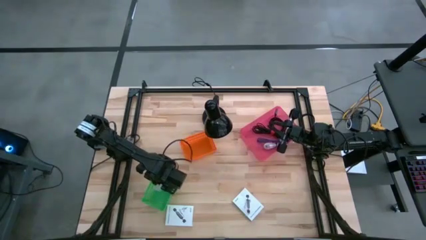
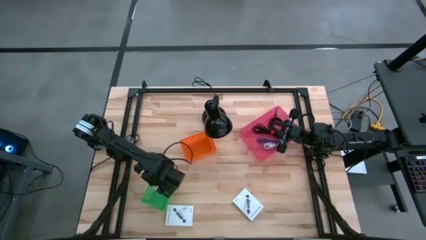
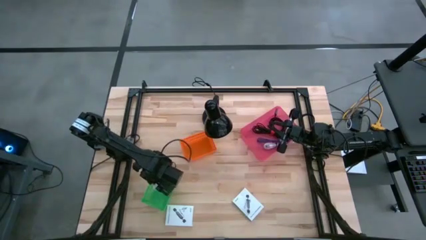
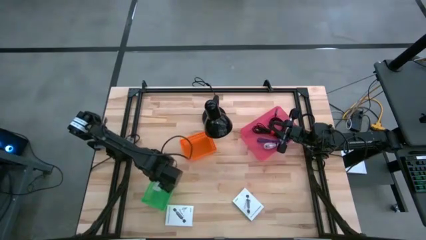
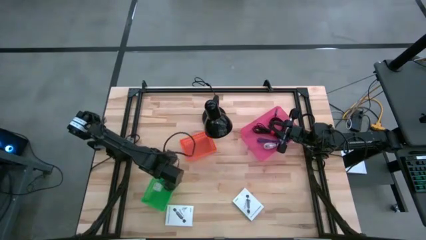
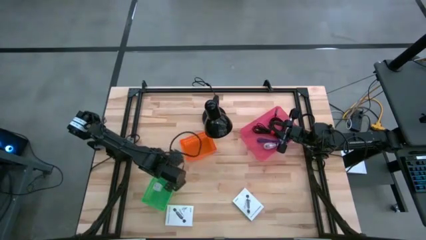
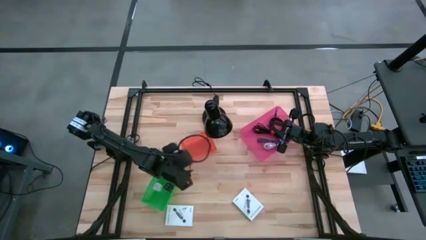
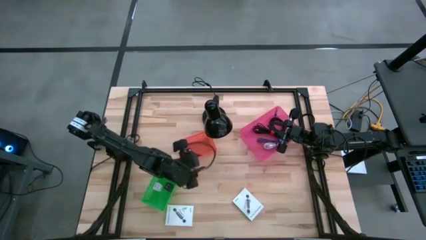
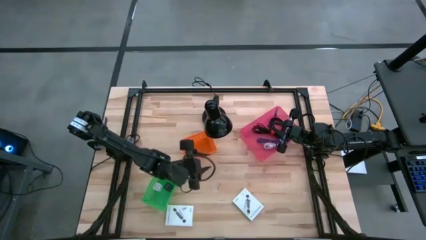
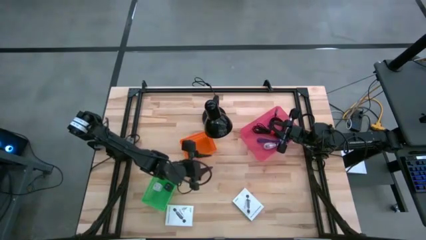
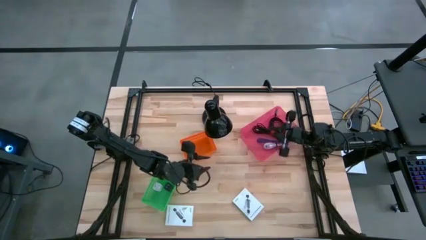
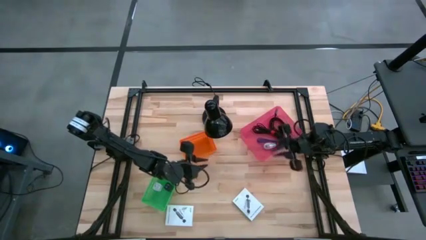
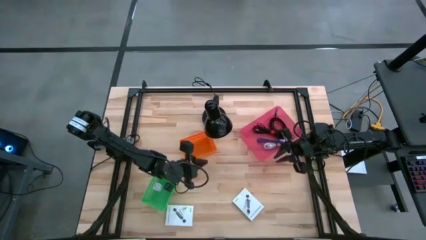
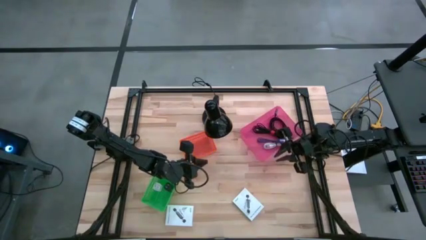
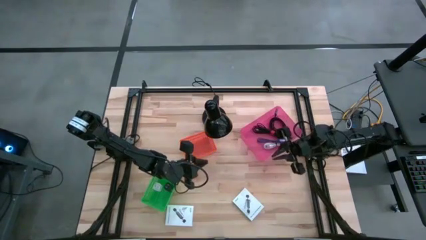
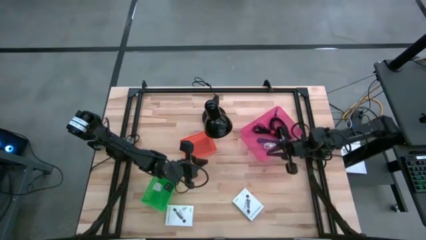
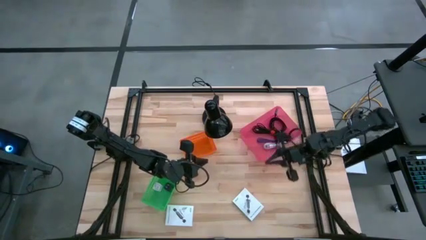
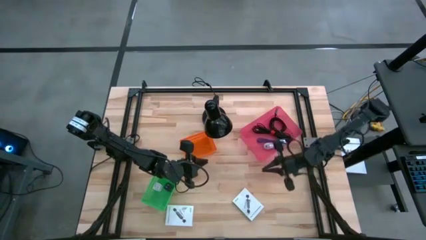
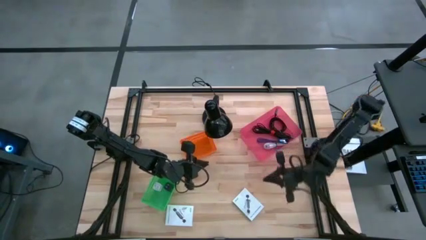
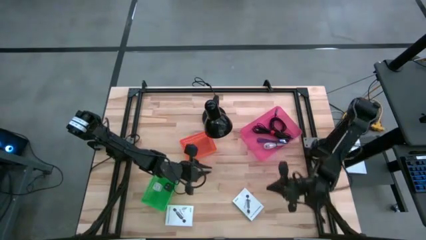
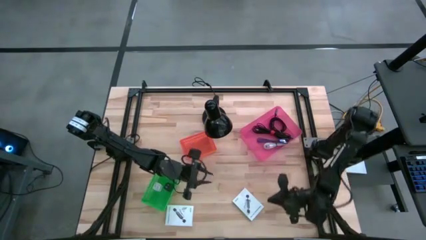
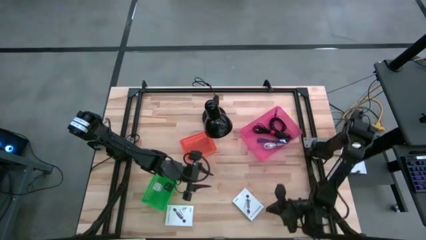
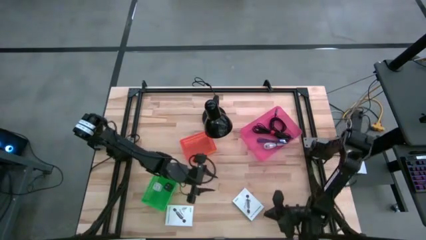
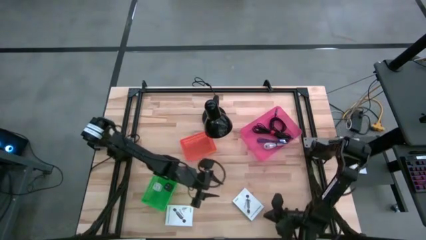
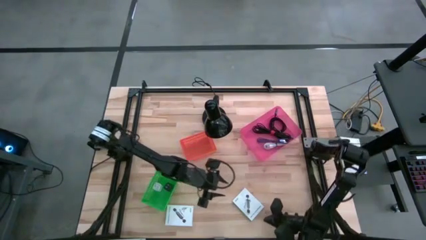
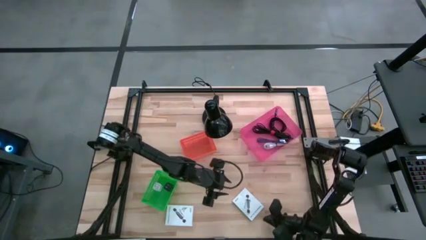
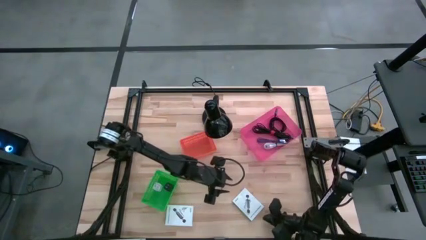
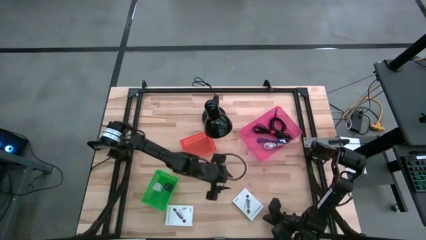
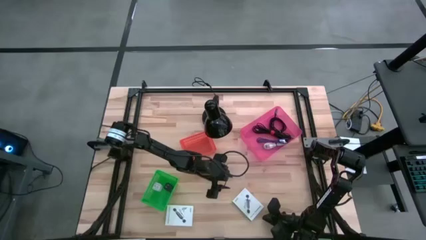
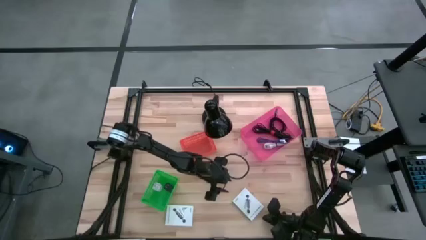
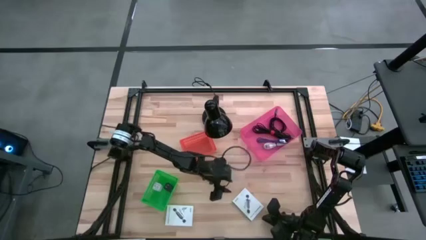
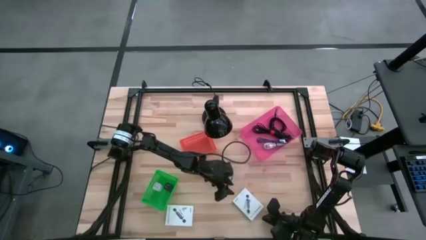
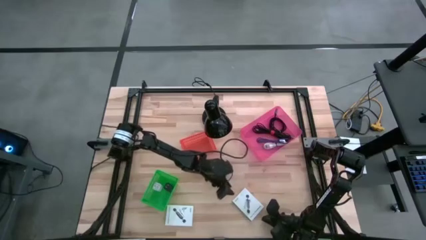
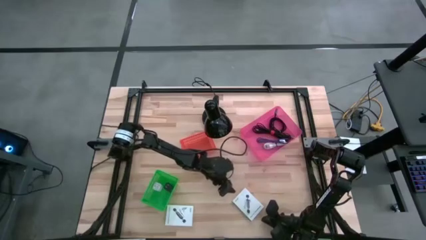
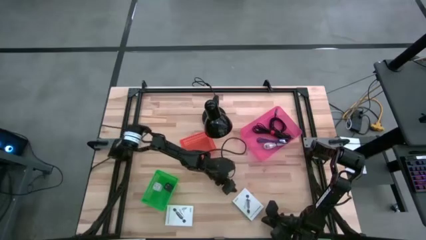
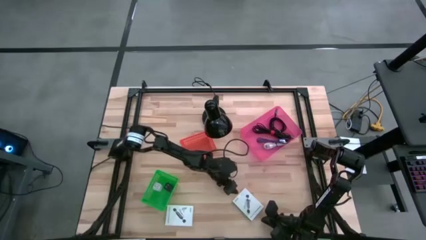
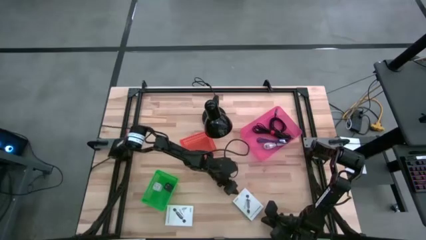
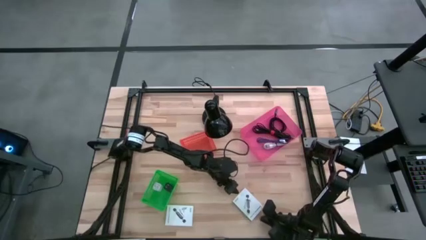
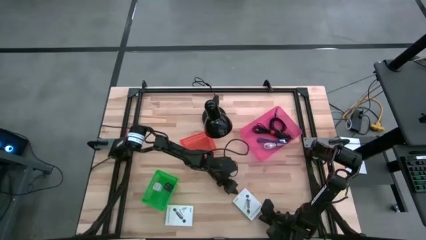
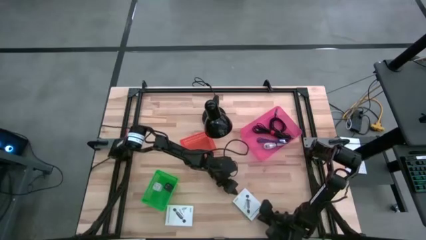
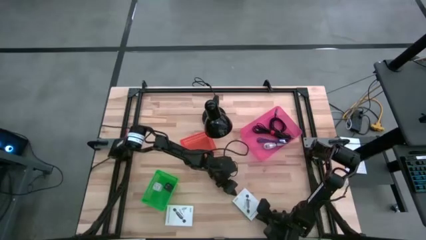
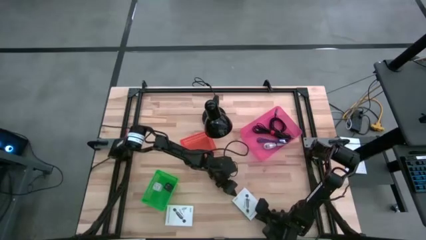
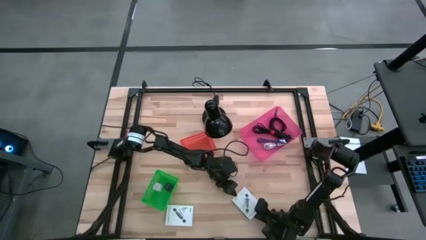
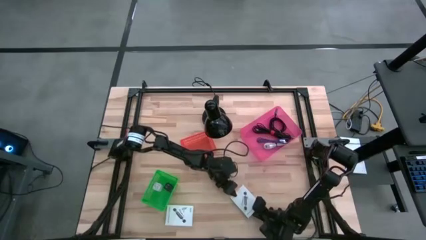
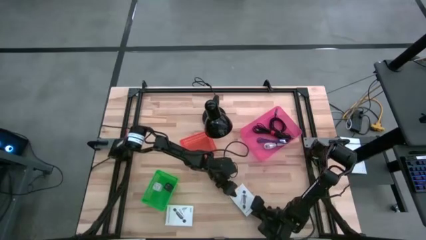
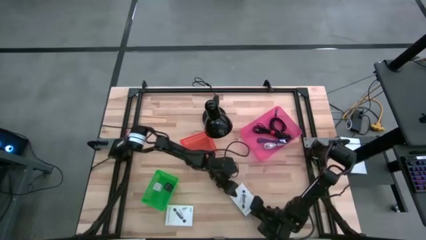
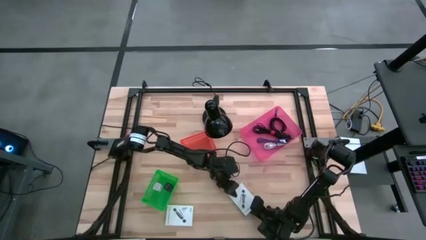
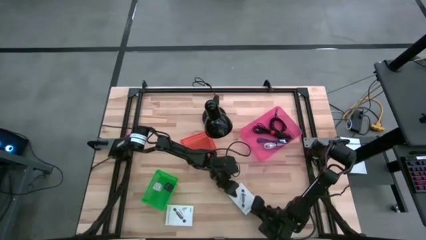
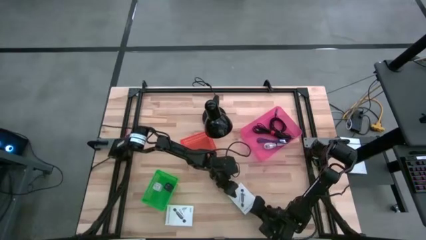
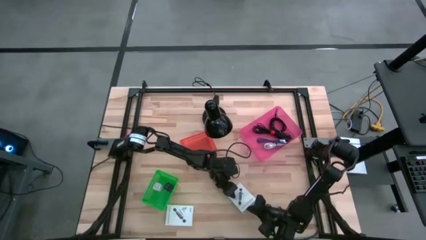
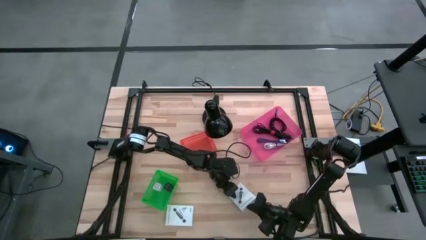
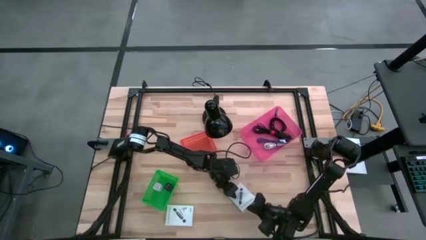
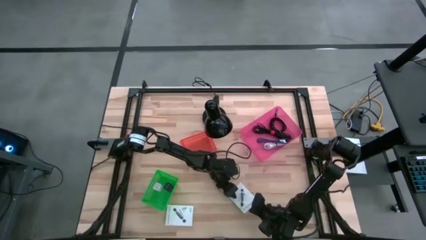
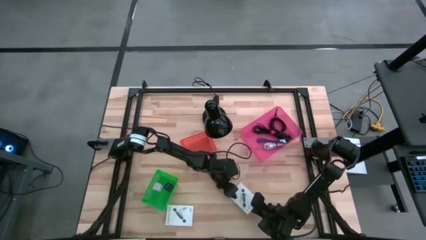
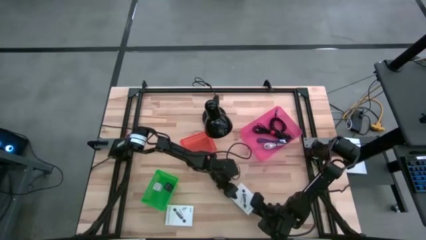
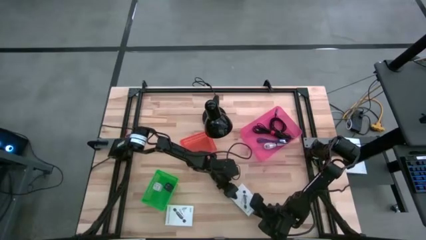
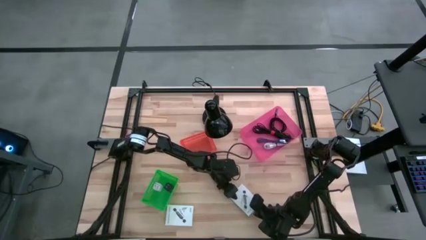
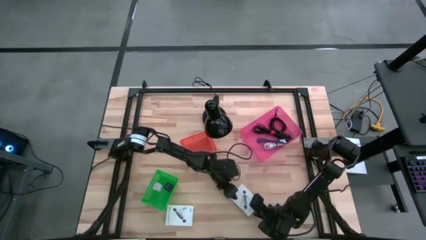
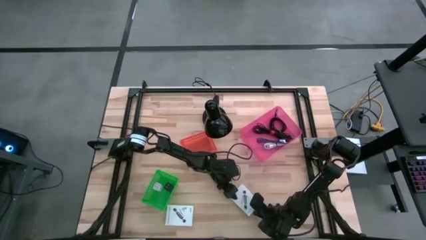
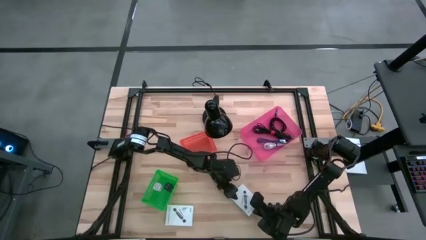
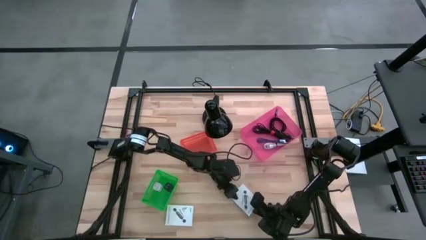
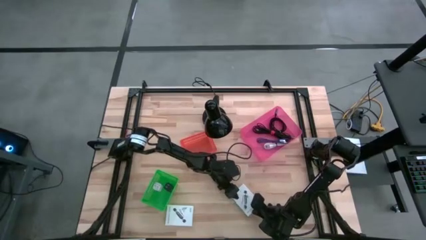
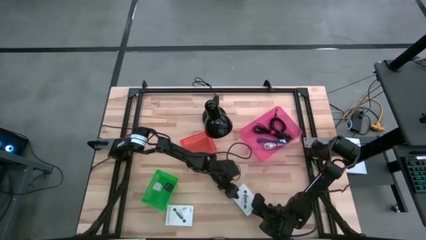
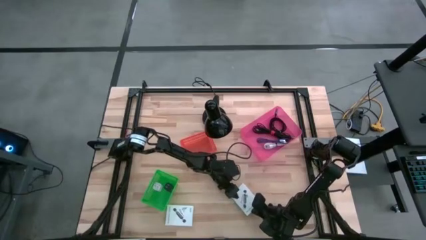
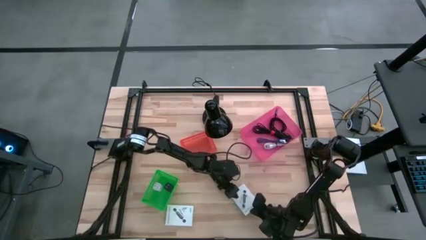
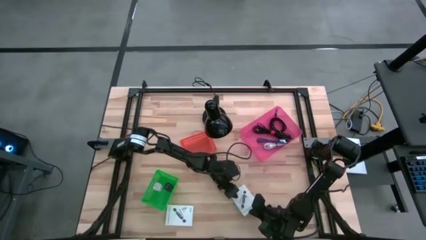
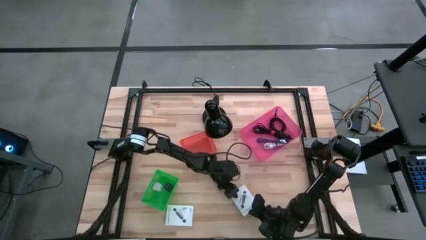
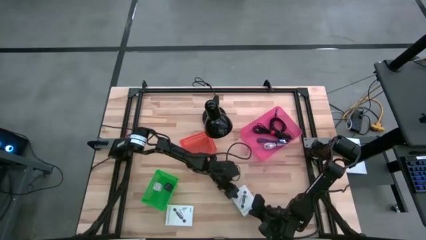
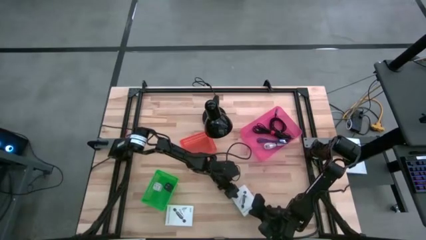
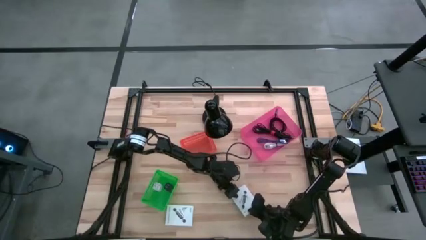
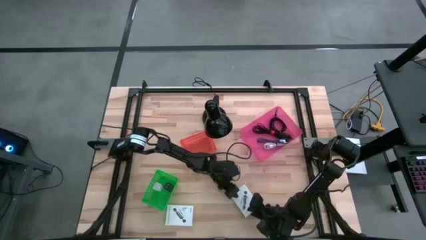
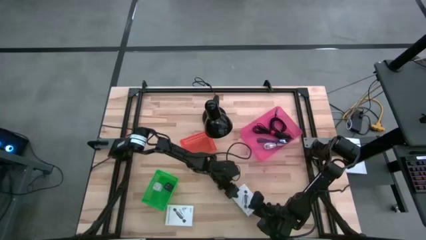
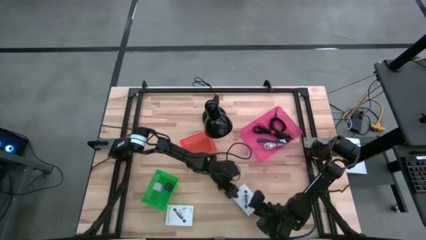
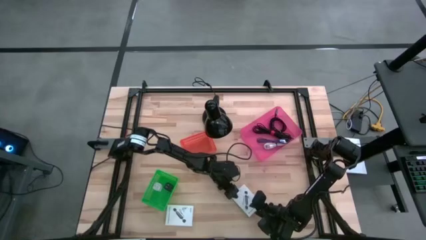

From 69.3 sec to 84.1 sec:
Task: Pick and place items into bin
Put the right white card reader box into the orange bin

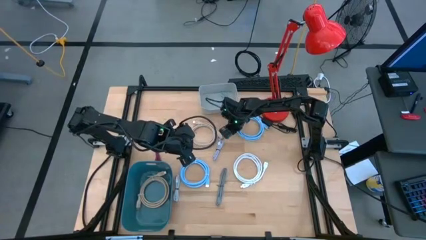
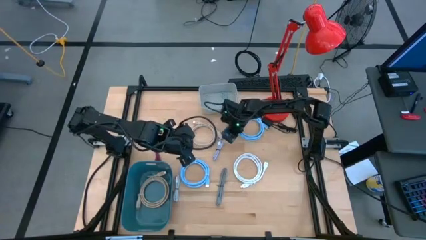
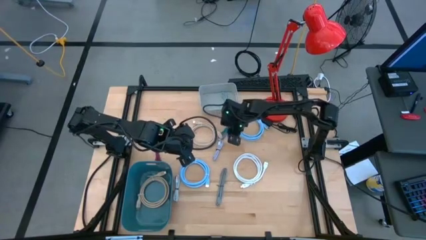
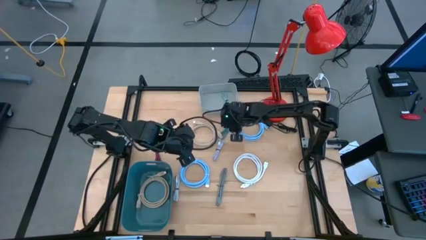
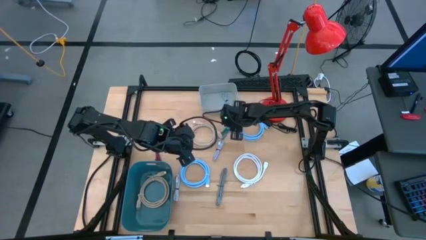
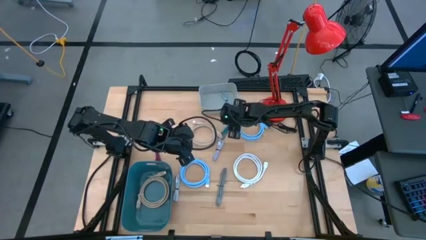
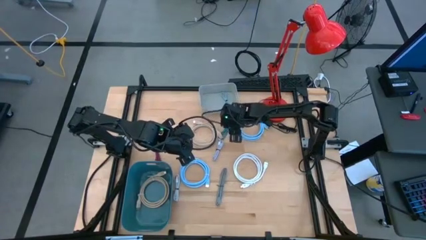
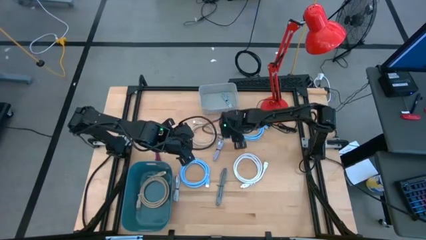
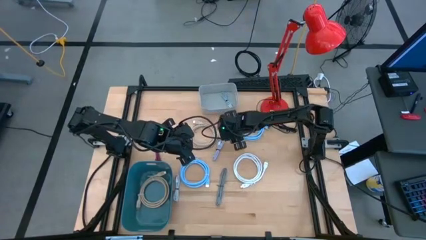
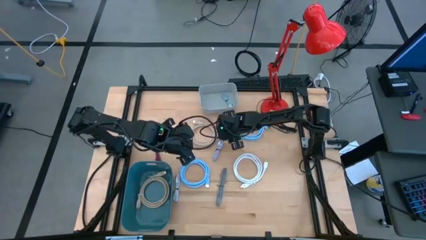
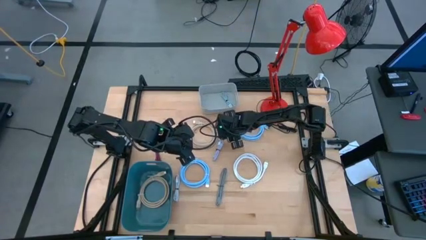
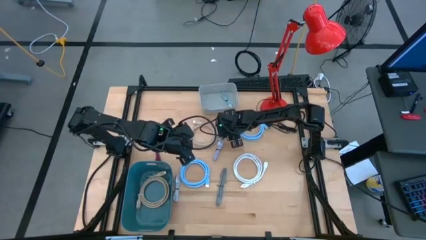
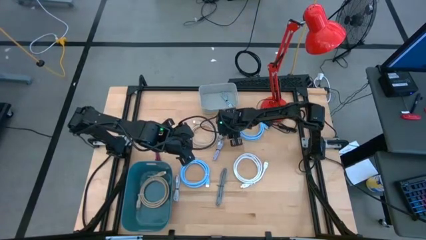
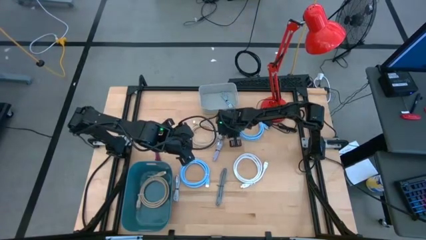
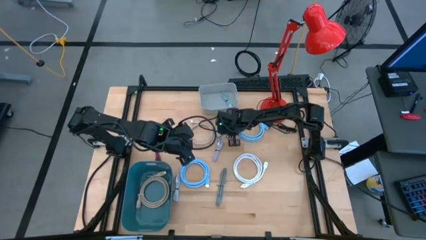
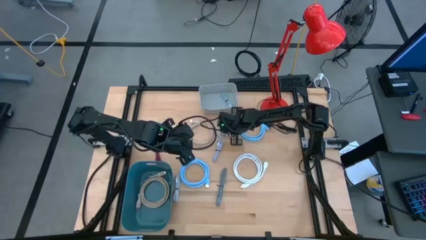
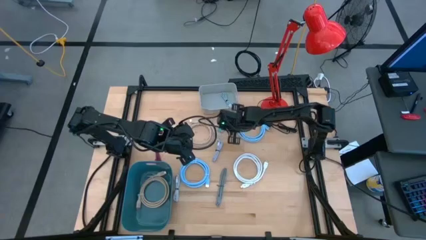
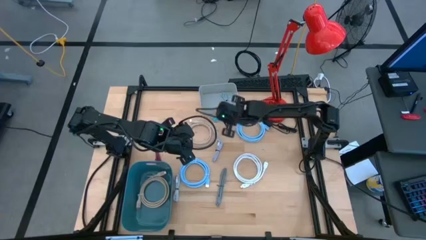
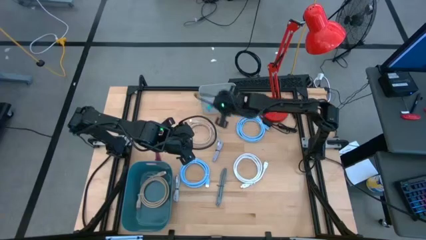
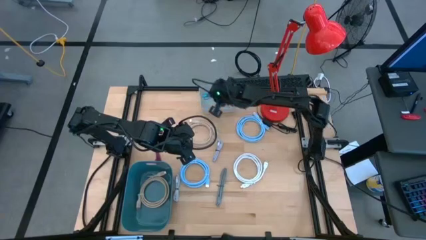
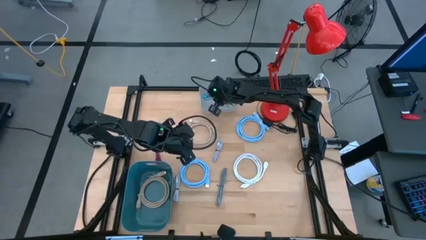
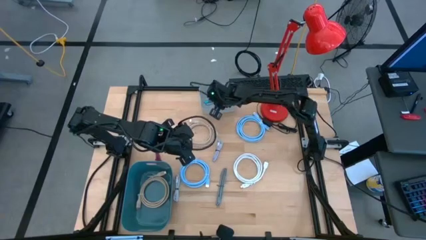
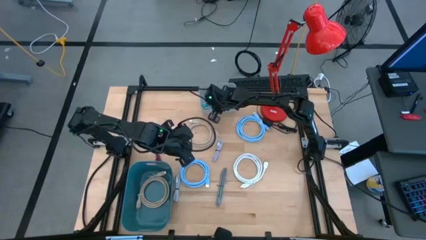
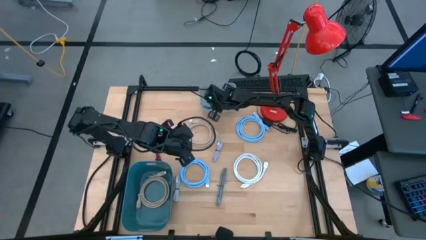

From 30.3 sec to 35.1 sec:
Task: Pick & Place USB Port
Put the black blue charger cable into the gray bin
